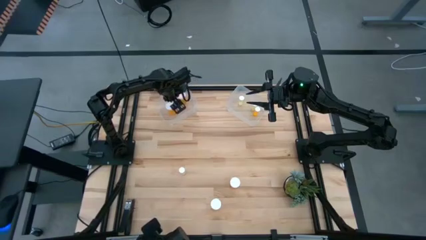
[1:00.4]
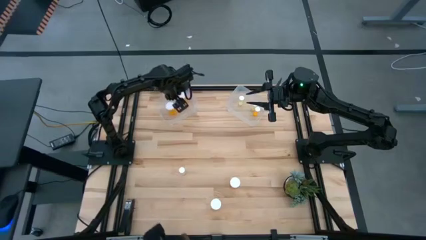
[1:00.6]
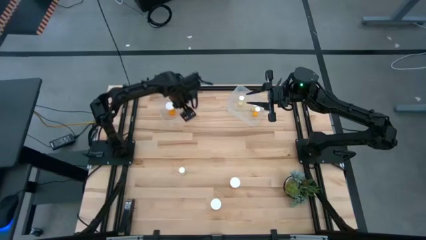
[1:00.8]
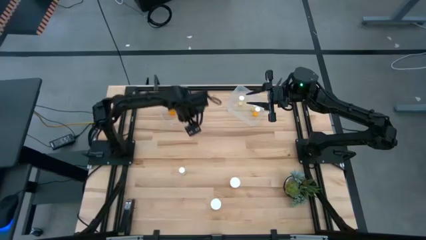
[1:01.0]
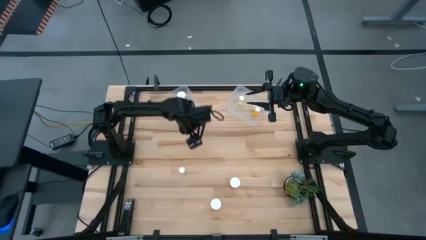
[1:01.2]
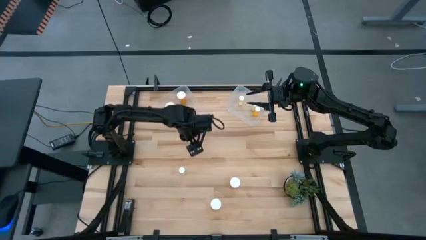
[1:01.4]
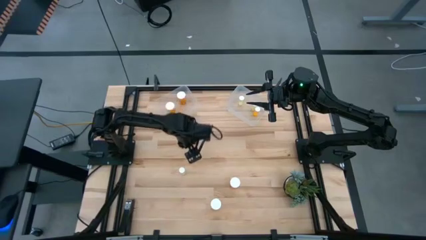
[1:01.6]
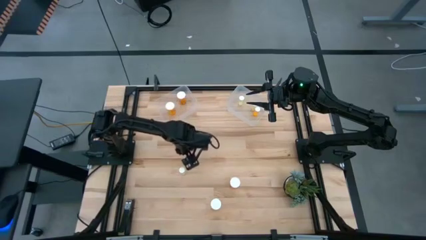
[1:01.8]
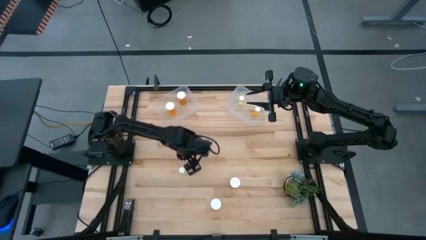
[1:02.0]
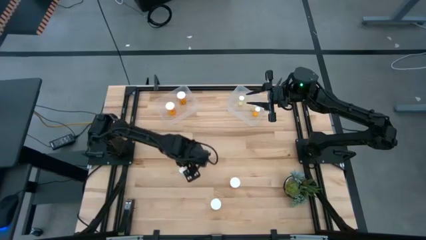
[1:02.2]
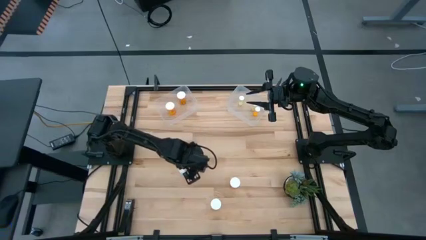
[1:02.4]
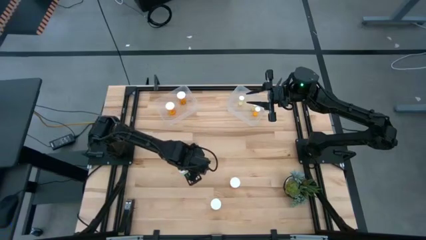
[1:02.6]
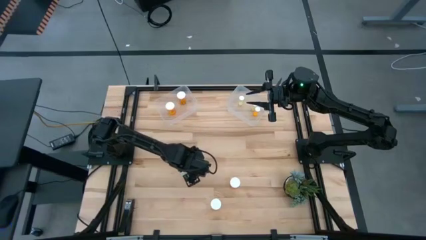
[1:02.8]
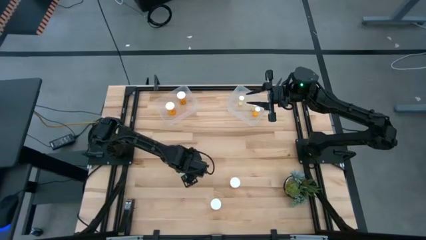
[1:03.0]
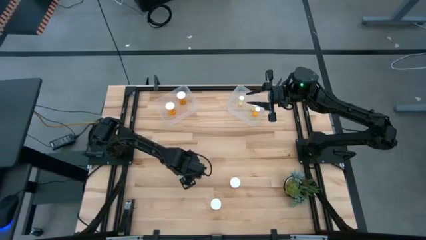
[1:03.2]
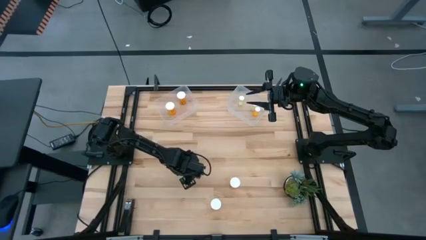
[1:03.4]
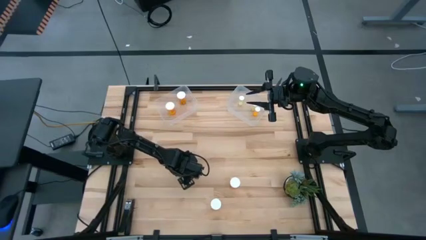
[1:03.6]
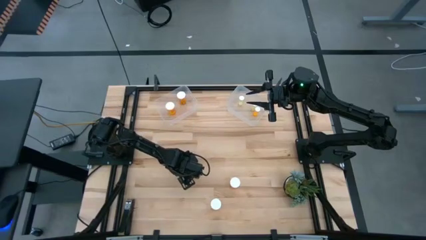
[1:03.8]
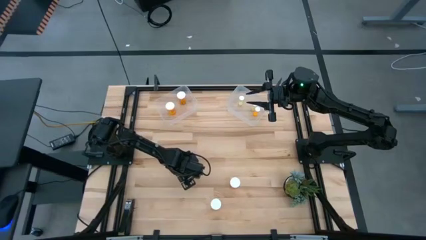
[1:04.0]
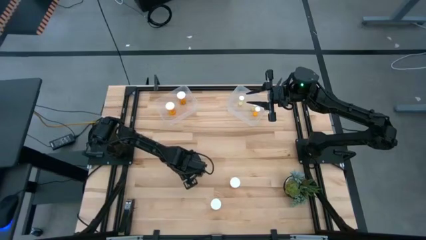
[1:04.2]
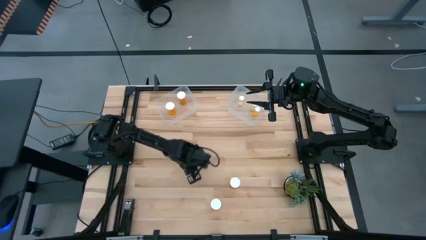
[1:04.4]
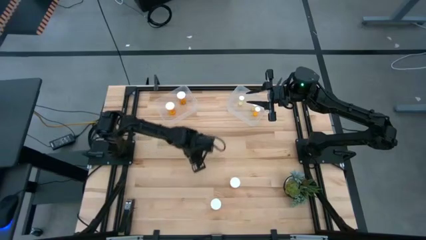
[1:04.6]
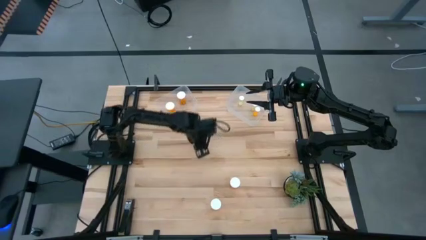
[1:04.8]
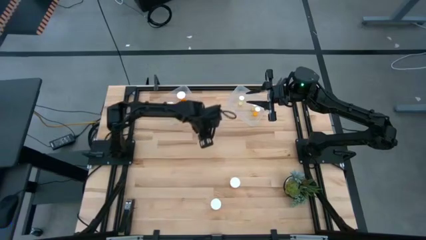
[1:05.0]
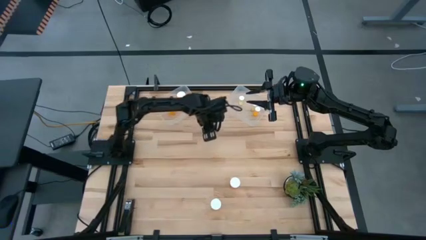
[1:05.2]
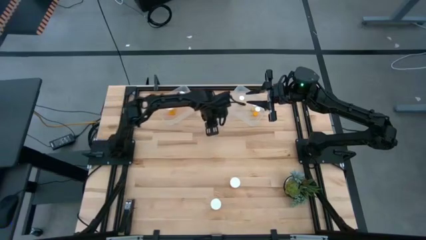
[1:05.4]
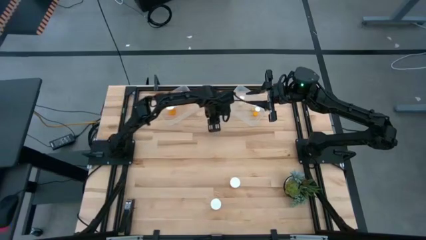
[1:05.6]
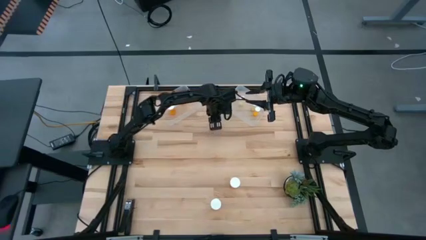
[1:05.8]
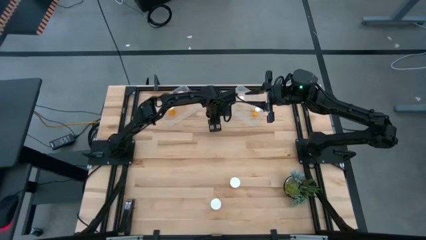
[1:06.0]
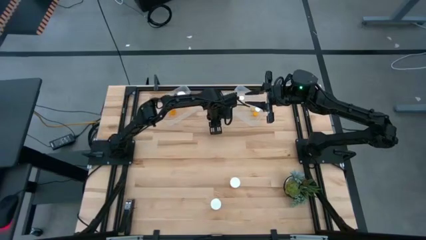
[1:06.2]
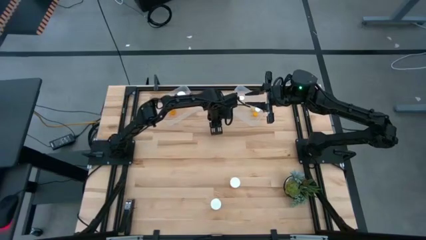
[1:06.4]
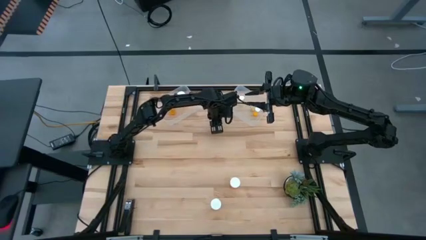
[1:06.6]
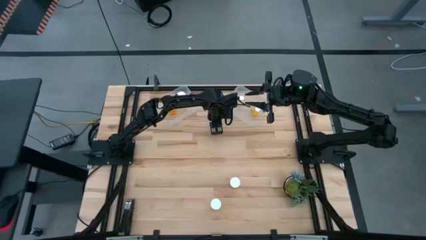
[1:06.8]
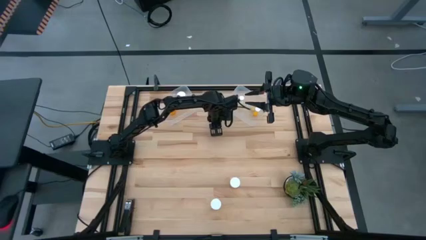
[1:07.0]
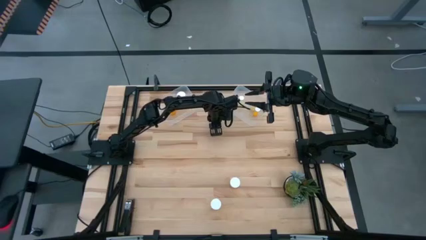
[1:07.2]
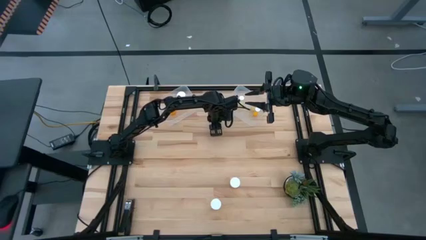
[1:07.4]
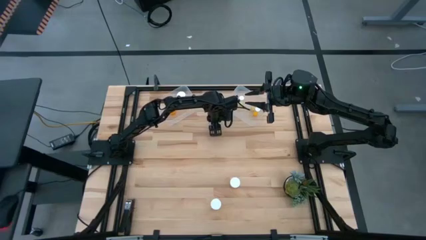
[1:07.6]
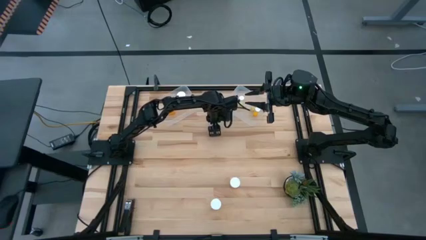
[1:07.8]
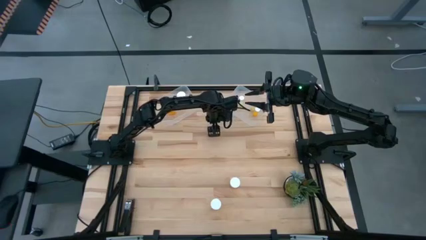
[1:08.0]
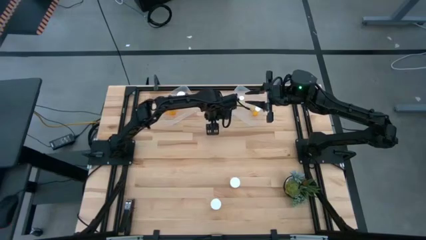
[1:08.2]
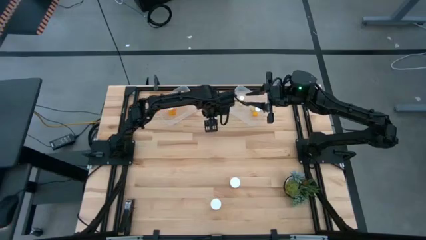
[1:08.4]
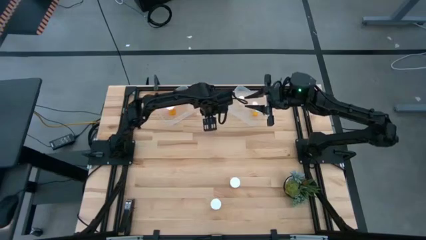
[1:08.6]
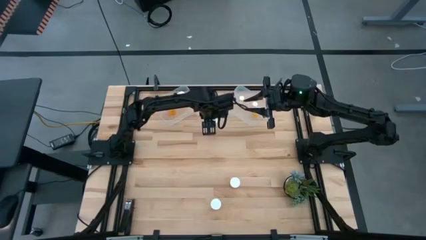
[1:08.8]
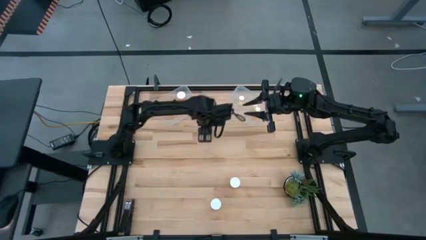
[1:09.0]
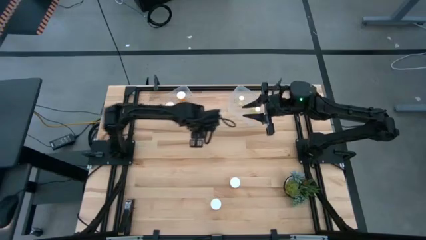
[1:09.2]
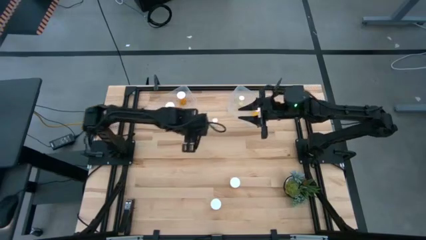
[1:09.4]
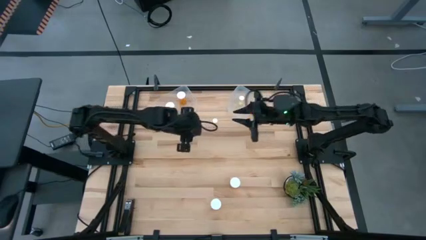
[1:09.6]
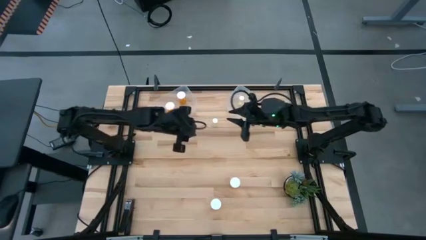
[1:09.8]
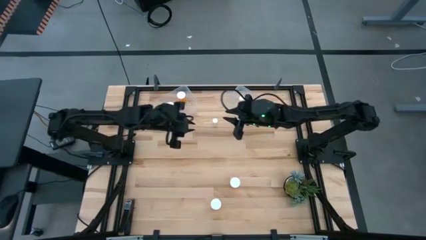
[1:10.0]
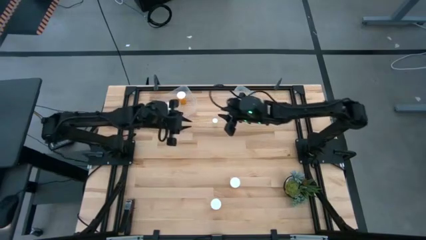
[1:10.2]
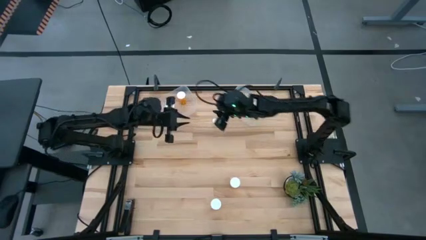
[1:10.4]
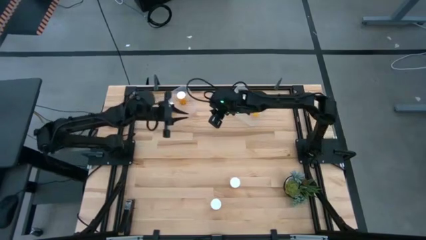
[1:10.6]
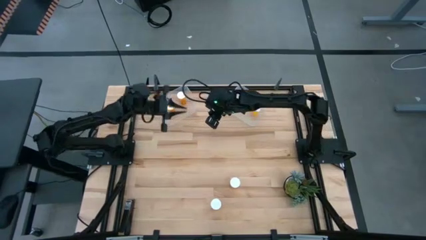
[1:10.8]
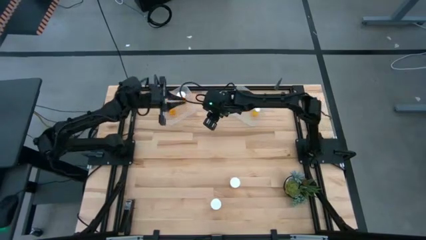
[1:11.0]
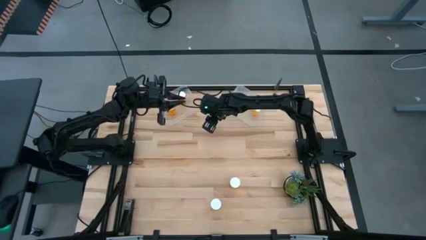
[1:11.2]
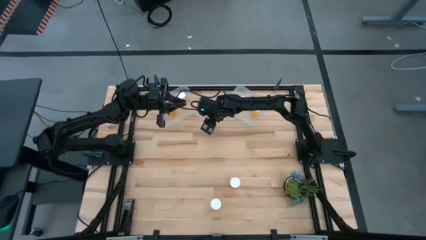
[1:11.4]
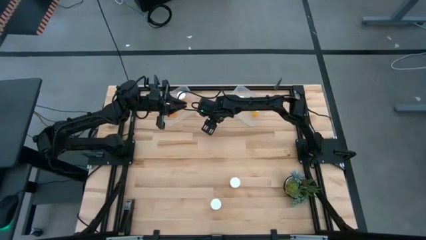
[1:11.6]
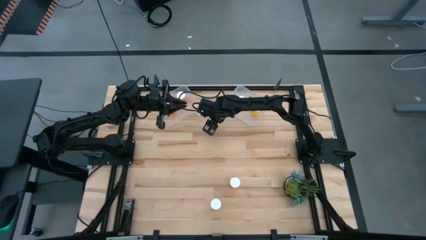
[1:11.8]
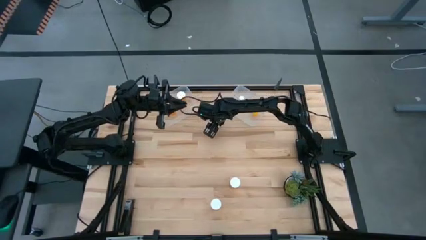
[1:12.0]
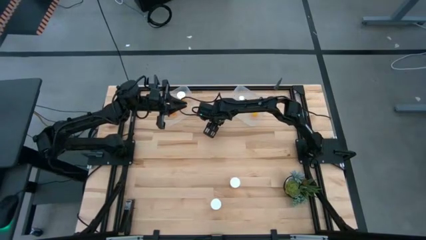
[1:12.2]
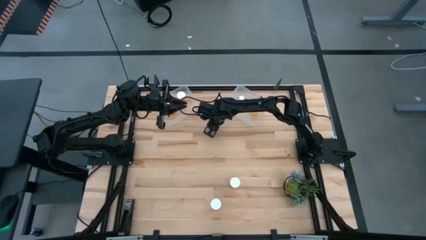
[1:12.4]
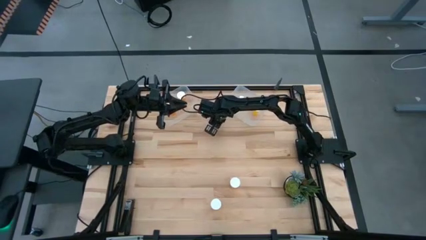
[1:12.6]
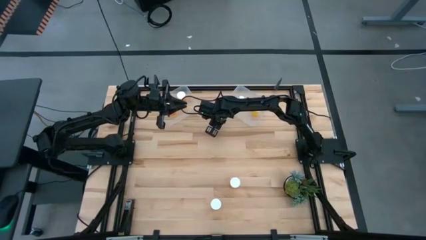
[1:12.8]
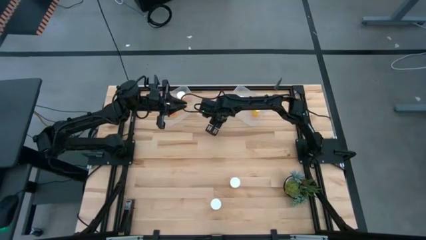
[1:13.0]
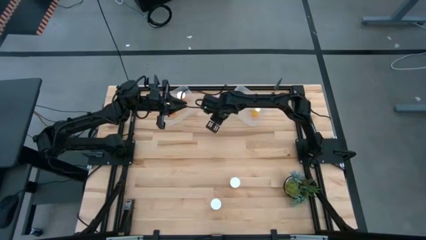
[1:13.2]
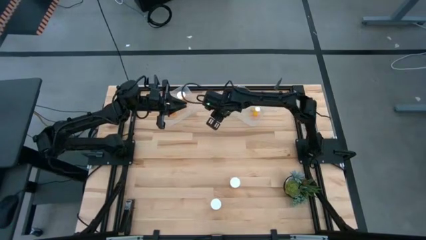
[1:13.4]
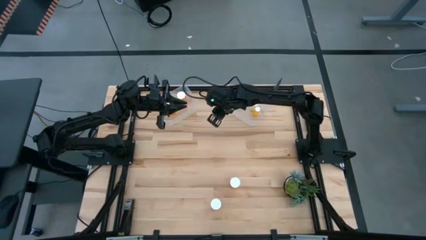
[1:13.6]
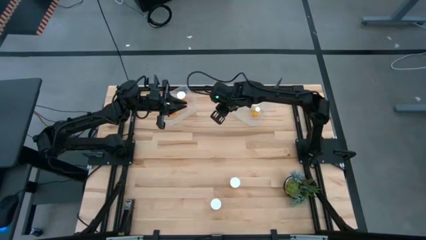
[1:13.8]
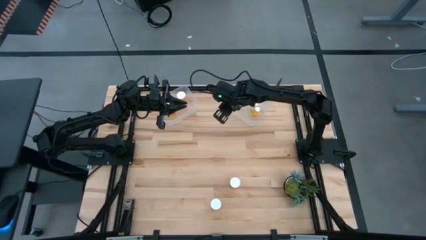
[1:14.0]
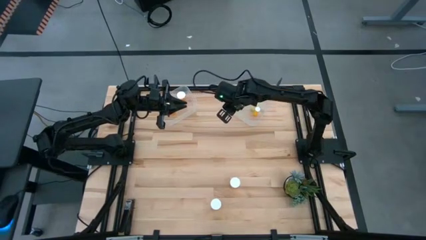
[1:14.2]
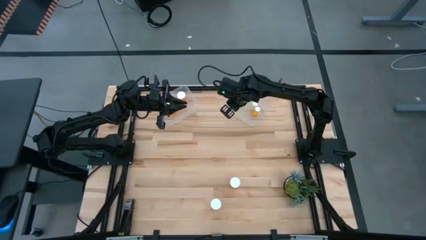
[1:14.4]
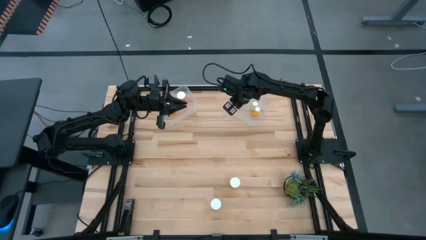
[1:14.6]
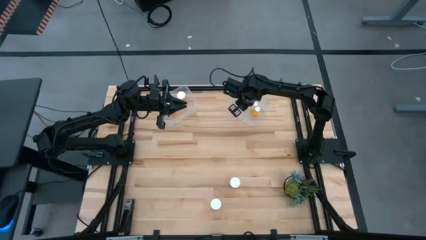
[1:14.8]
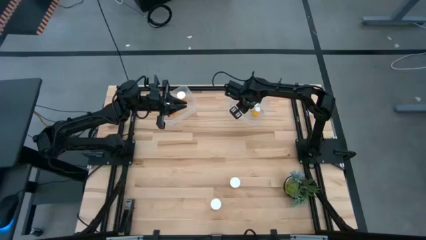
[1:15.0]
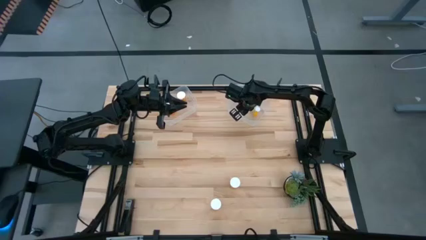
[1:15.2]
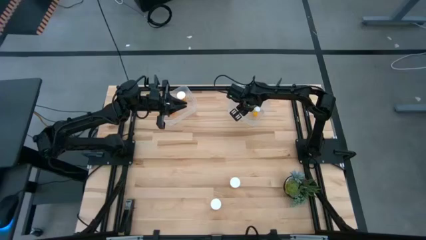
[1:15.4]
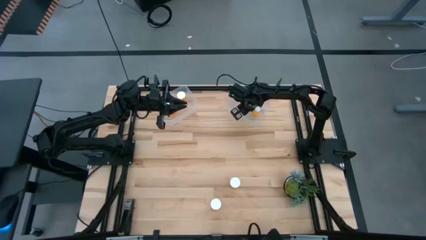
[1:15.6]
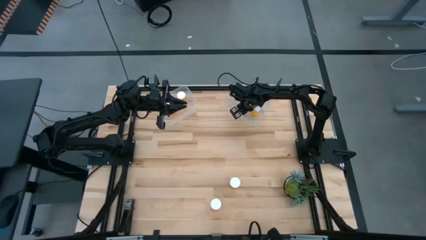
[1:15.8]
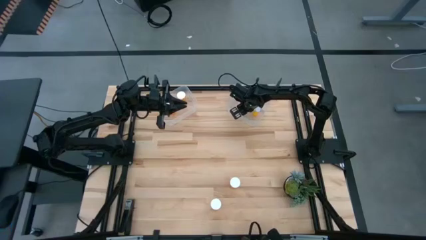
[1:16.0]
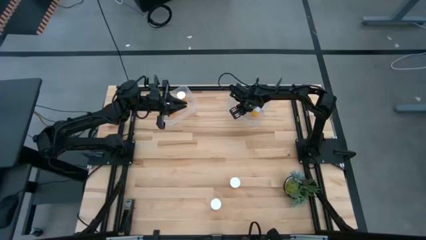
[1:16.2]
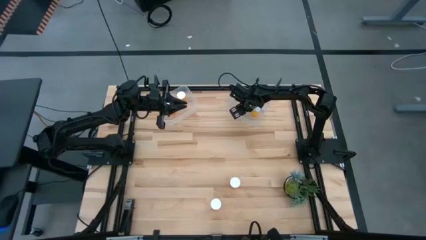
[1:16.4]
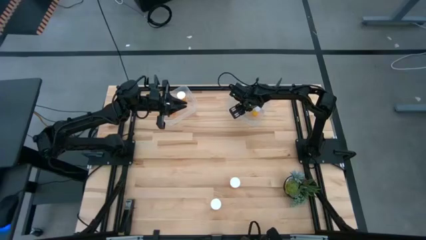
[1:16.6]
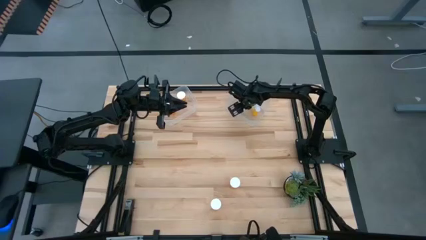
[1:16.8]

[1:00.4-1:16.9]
Task: Pick and place medicine bottles into bin by pill shape (circle, oval)
Put the small yellow pill bottle into the right transparent bin
